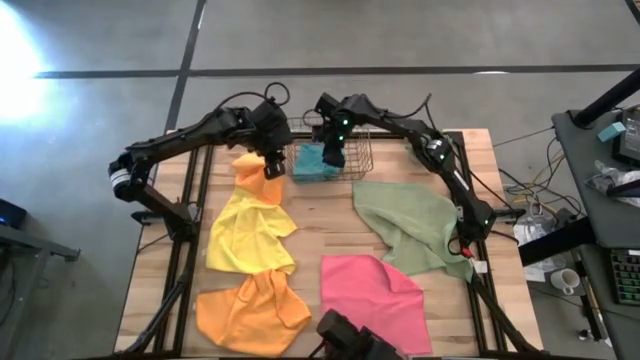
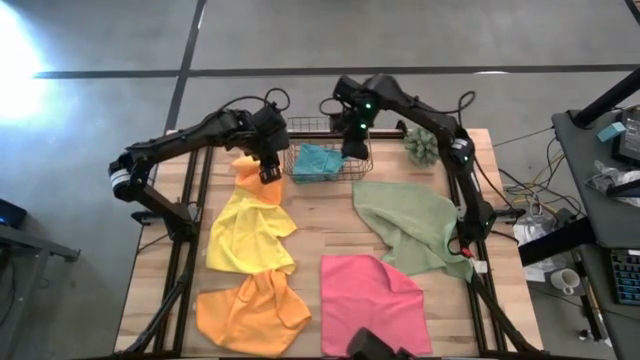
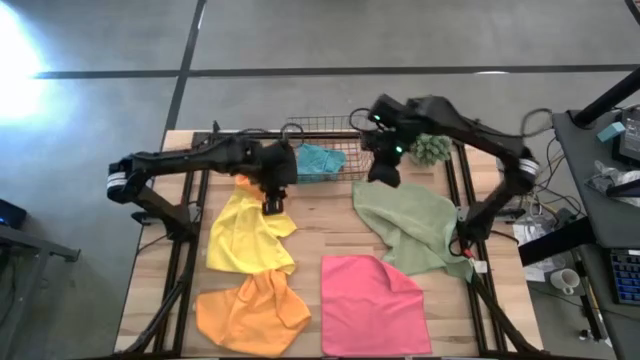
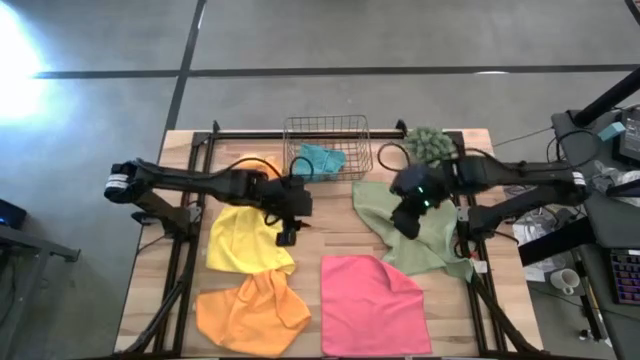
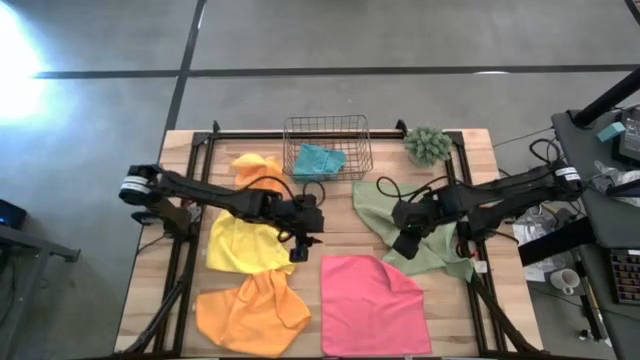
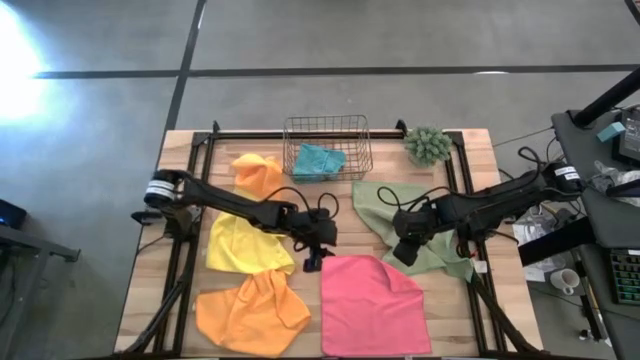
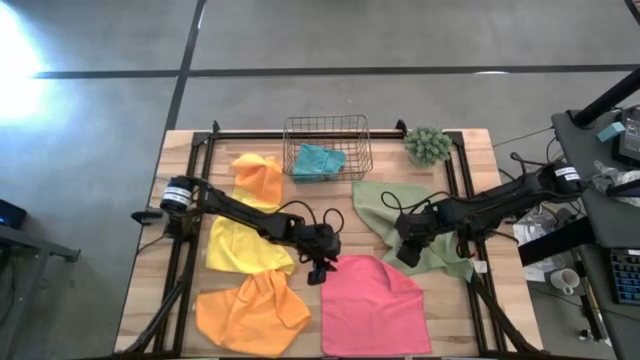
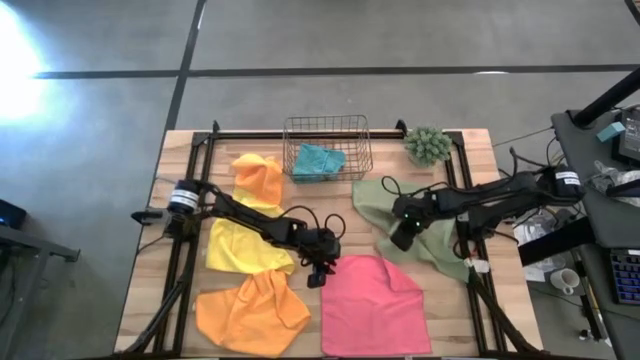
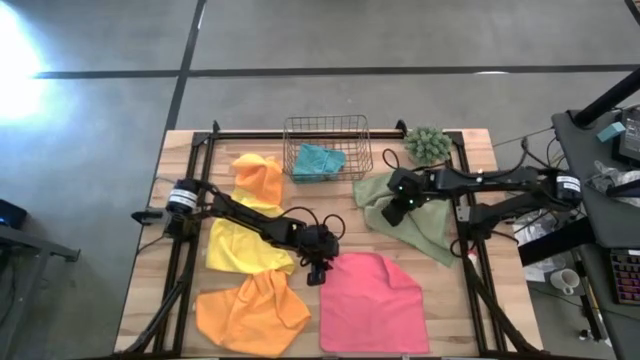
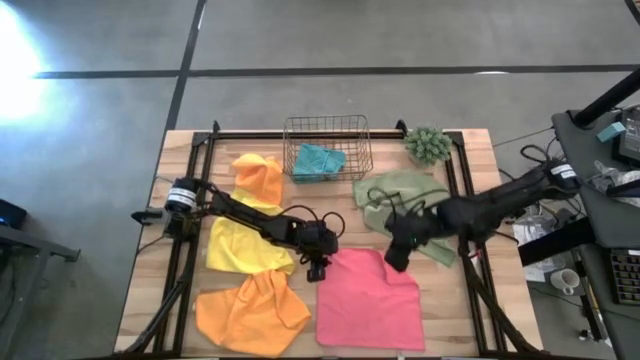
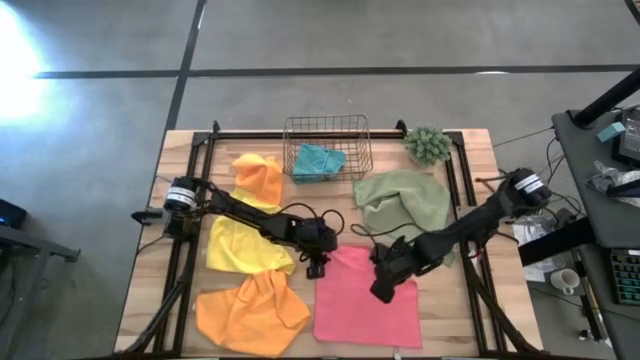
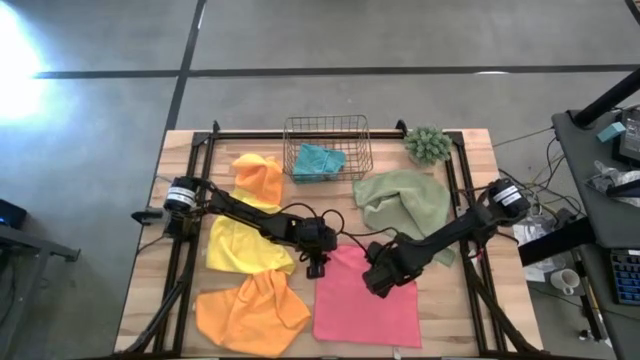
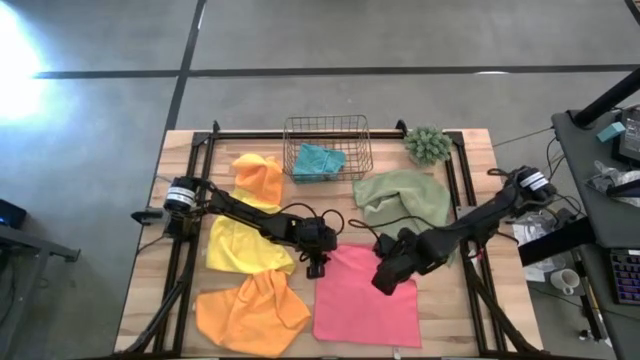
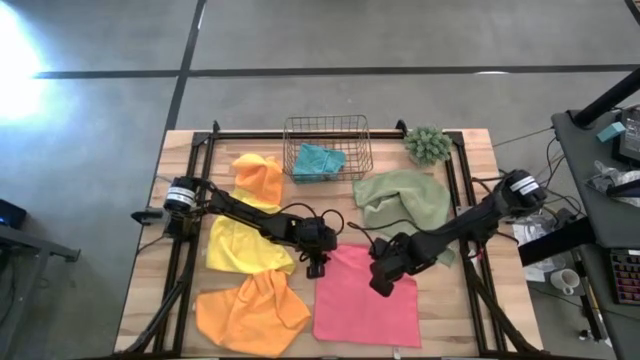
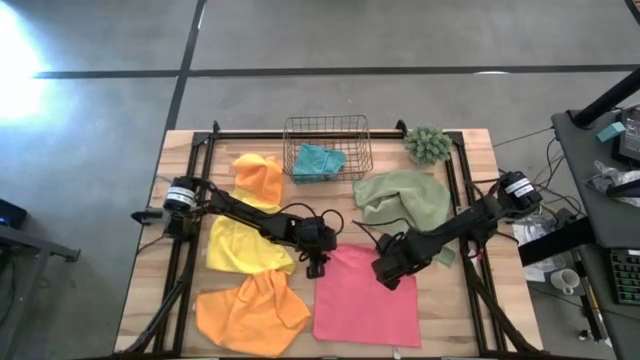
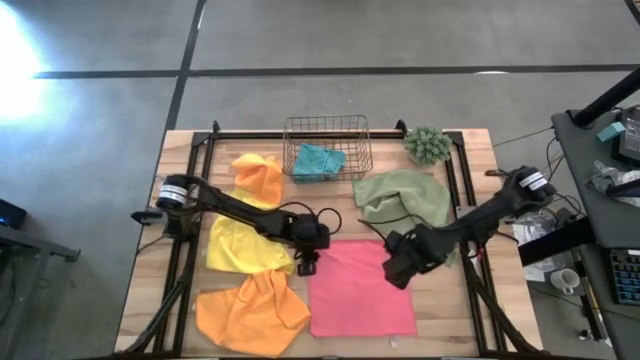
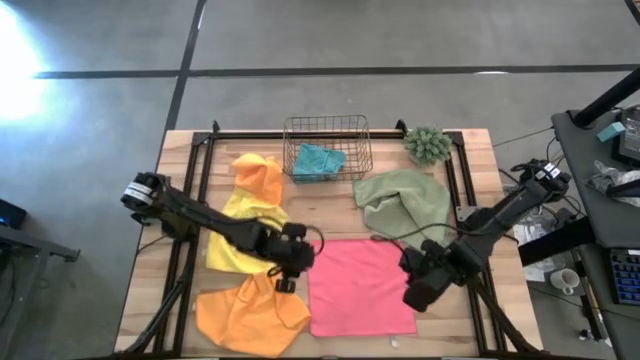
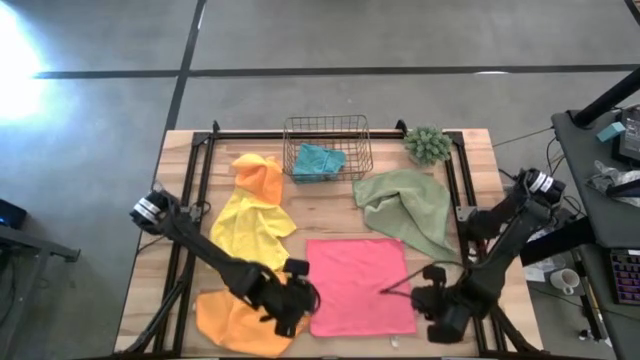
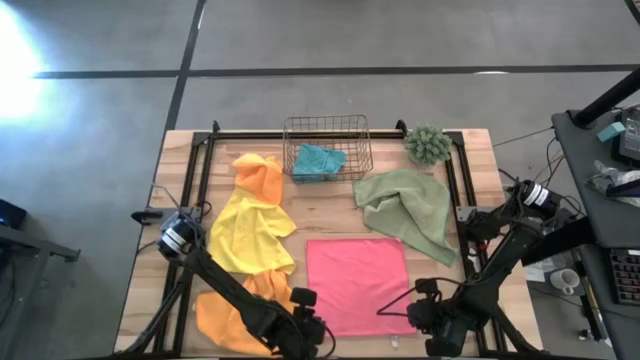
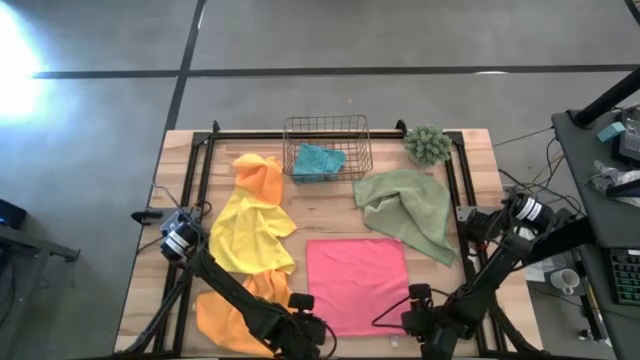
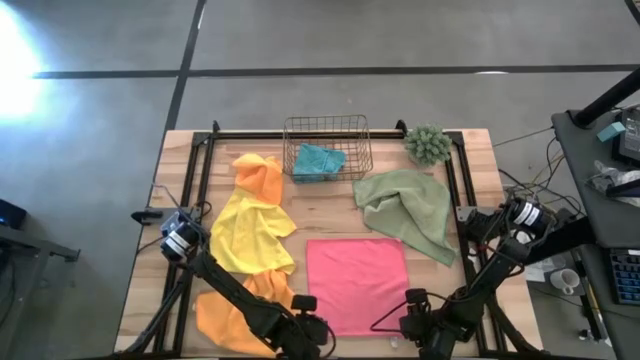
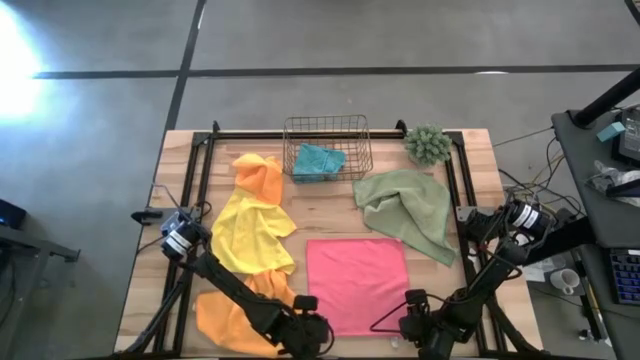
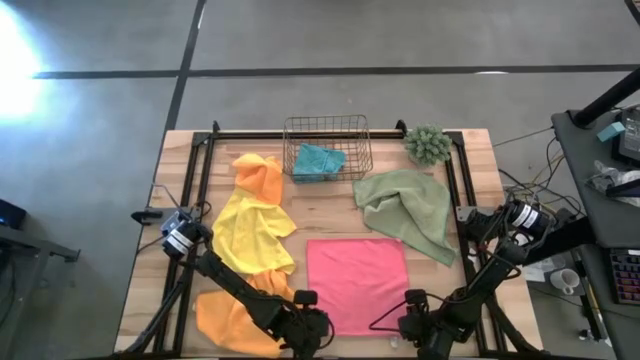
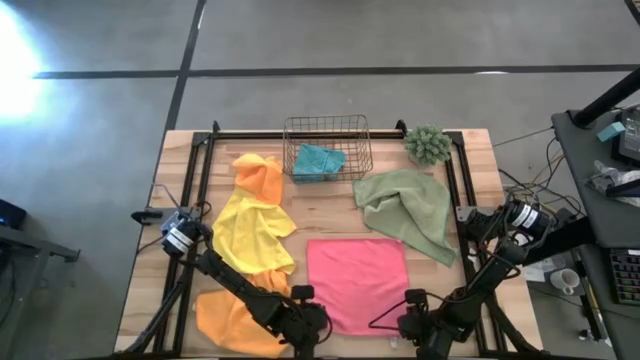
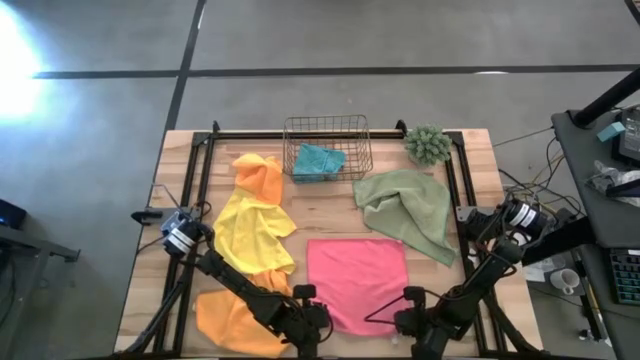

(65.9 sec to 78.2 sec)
Task: Fold microfiber towels
Fold the pink microfiber cloth

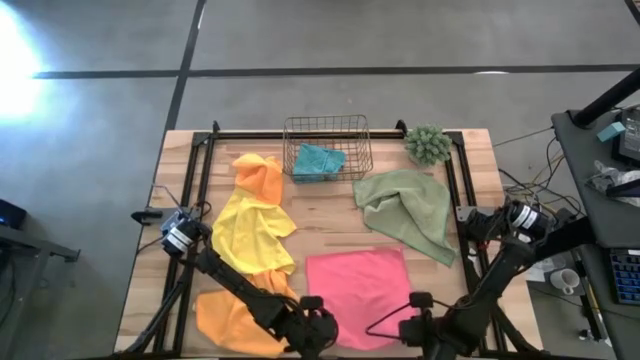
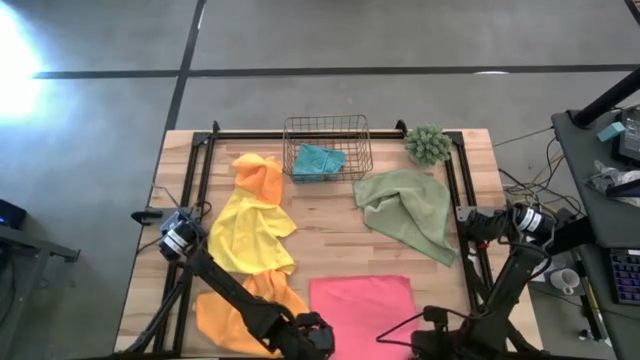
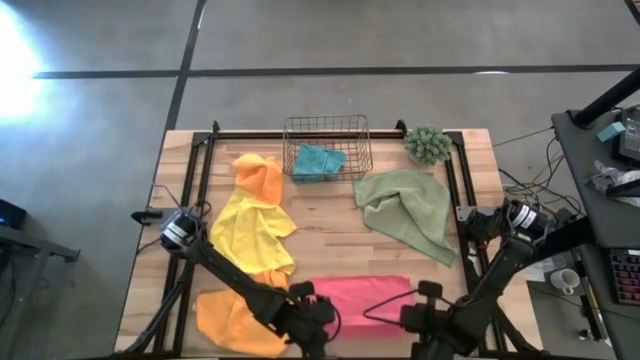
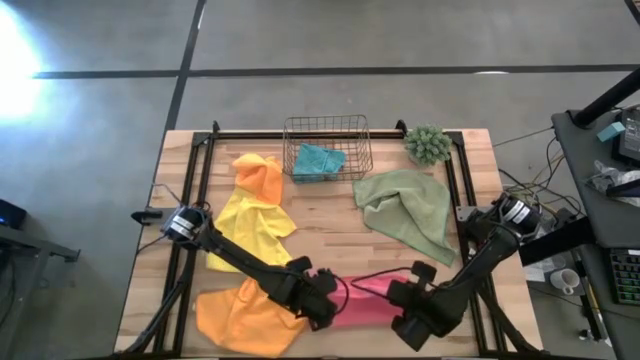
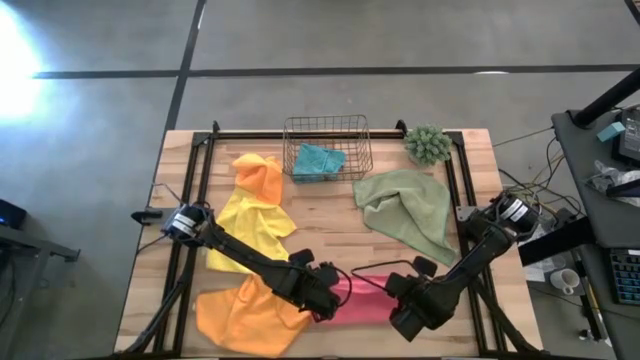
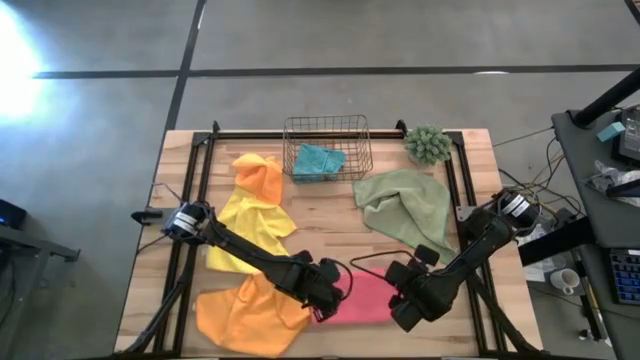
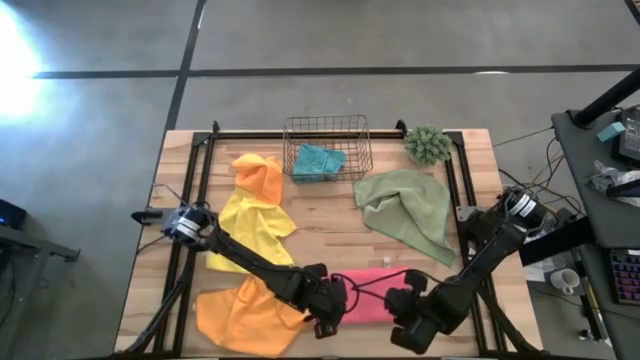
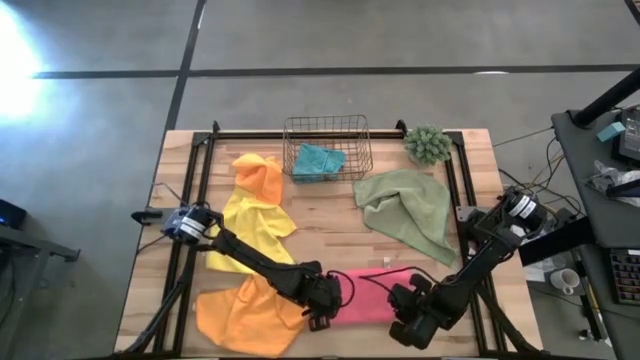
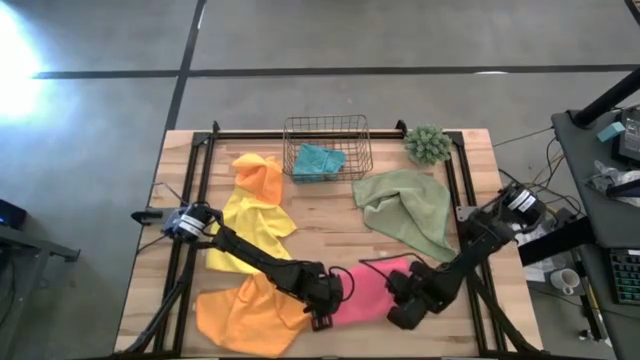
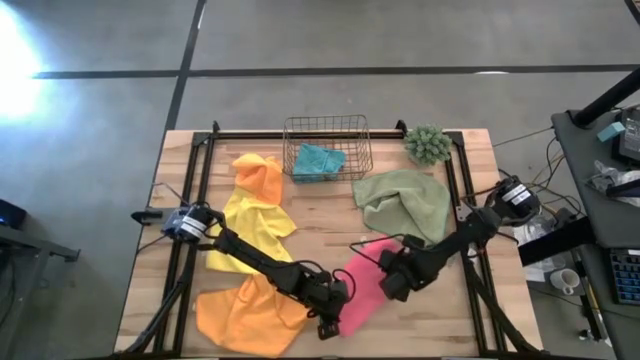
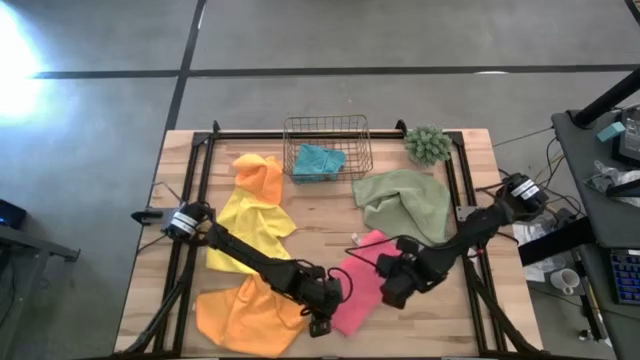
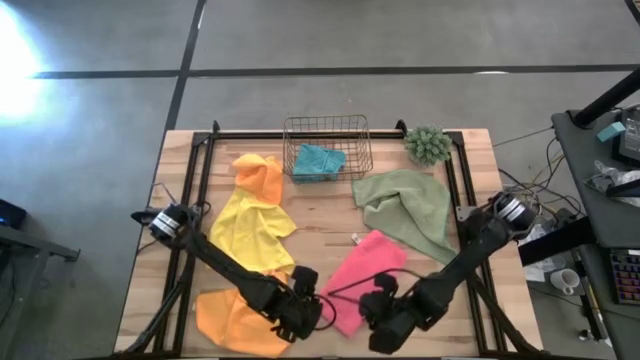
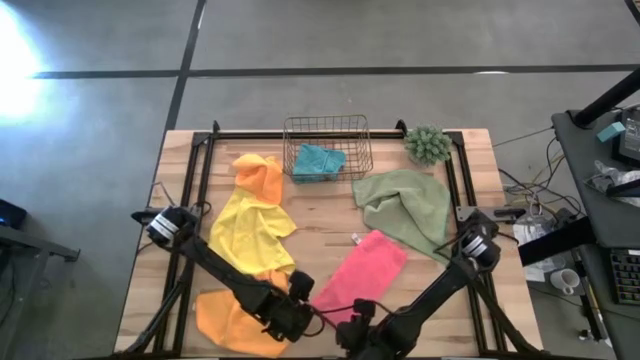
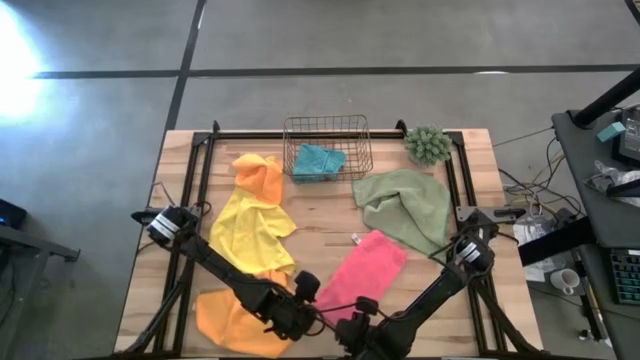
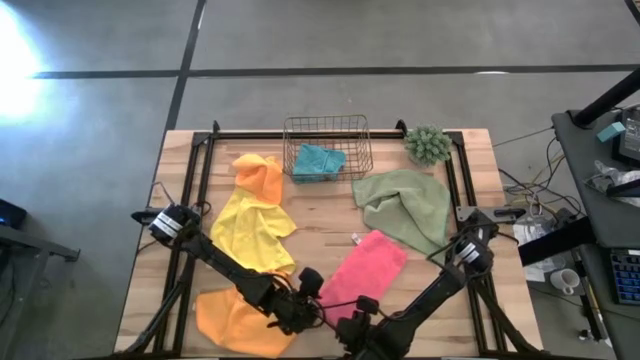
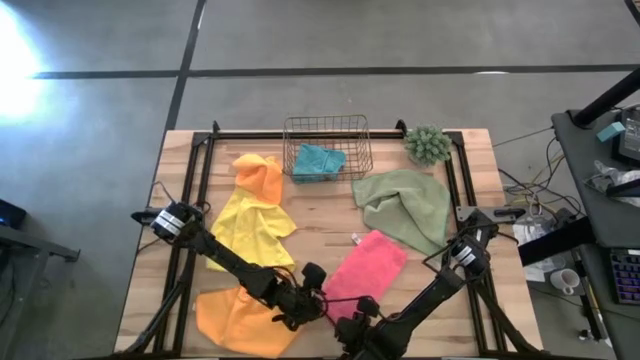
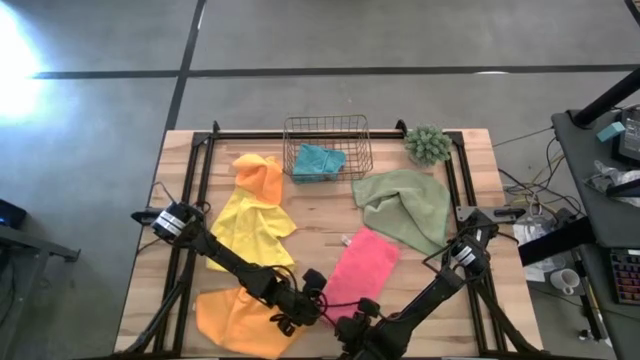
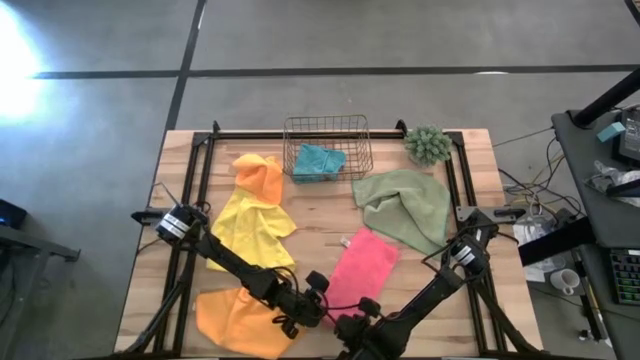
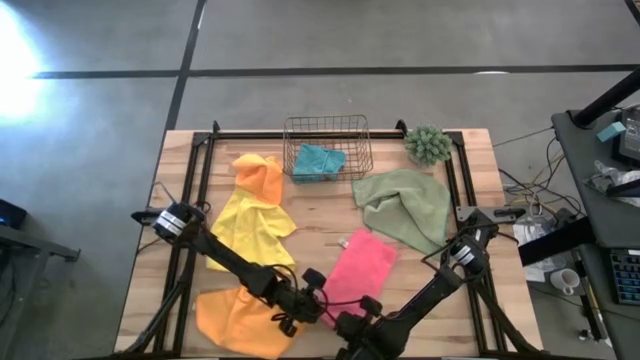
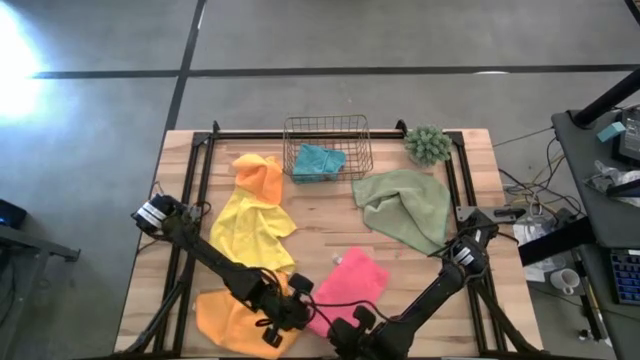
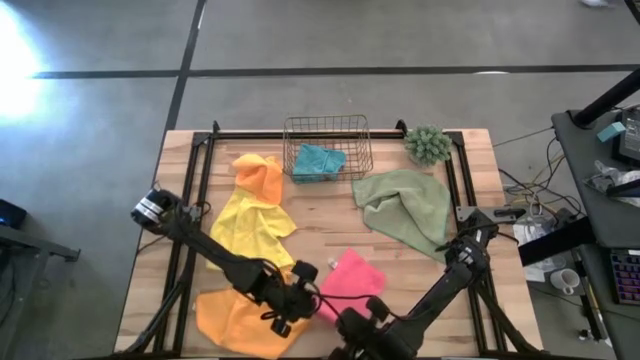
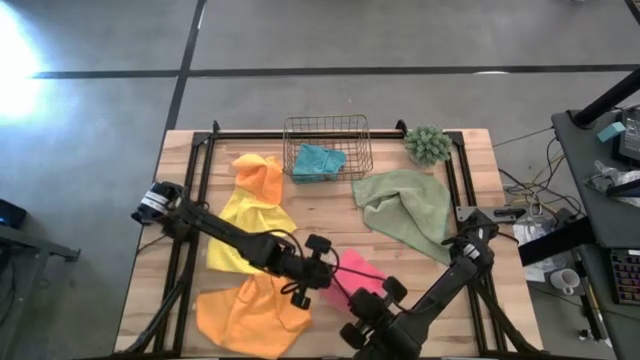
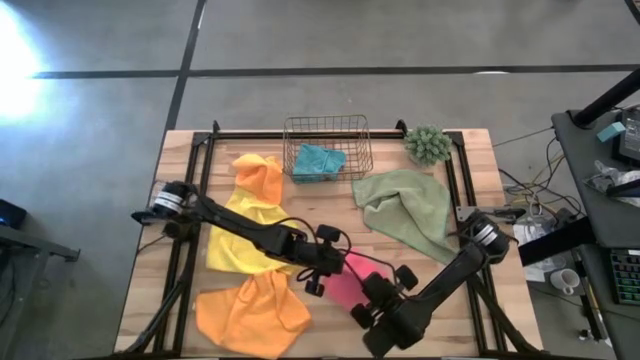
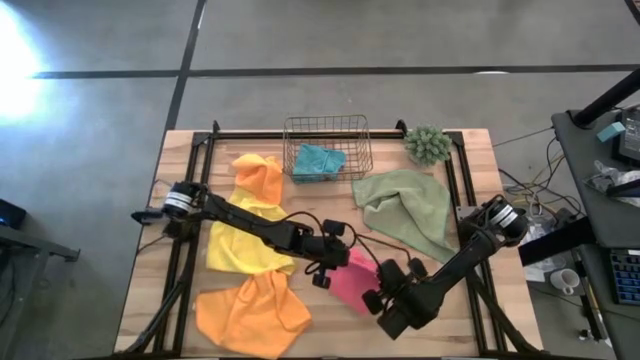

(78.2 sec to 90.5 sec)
Fold the pink microfiber cloth
